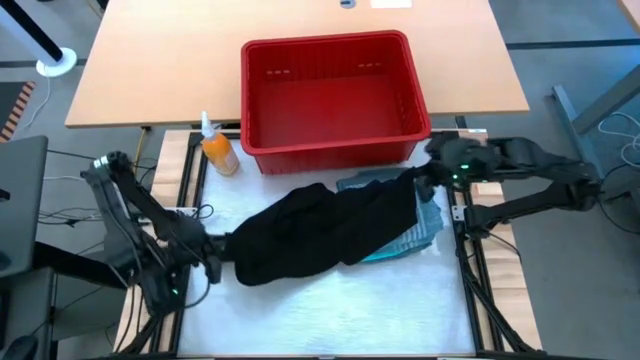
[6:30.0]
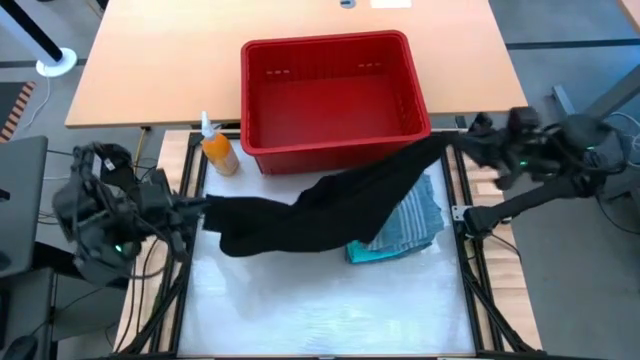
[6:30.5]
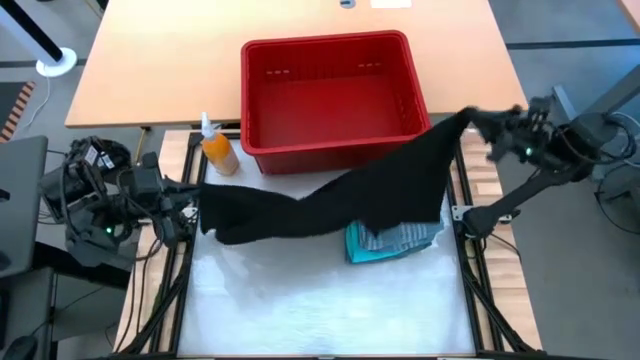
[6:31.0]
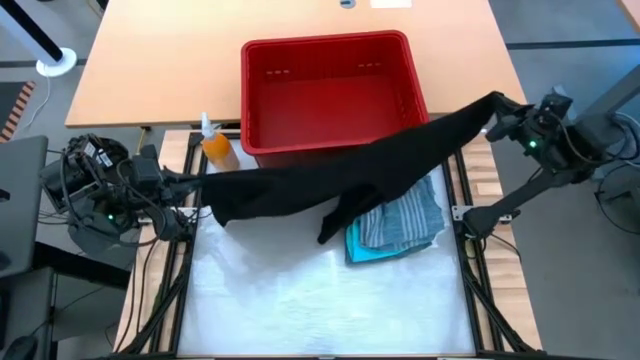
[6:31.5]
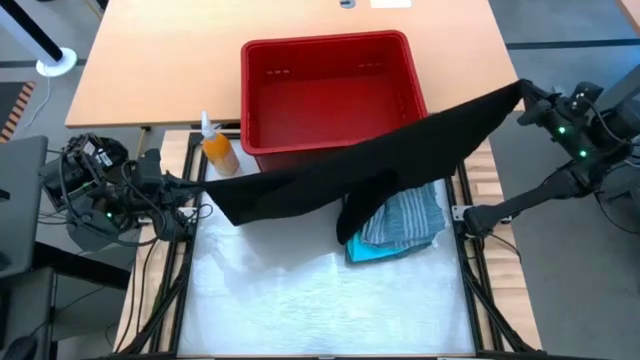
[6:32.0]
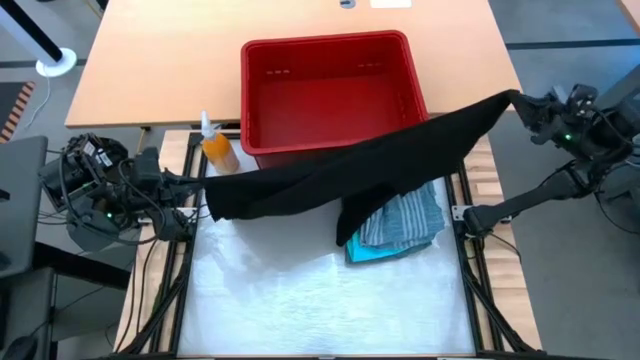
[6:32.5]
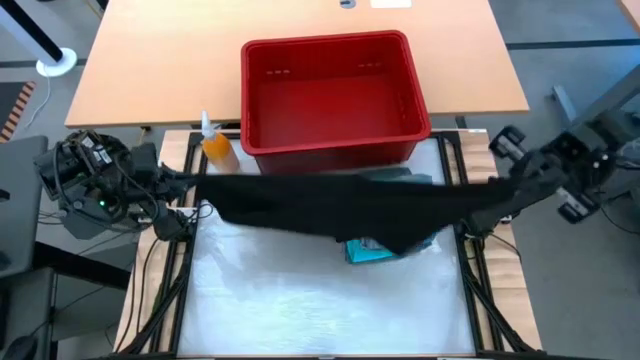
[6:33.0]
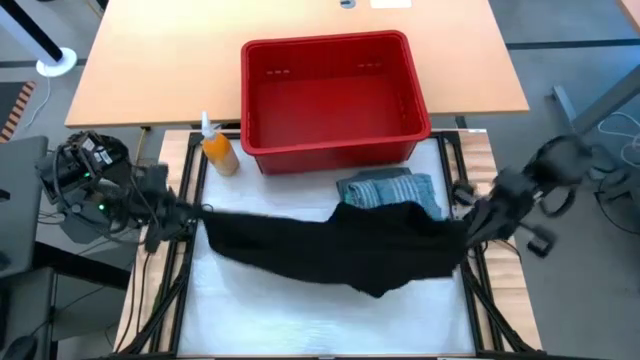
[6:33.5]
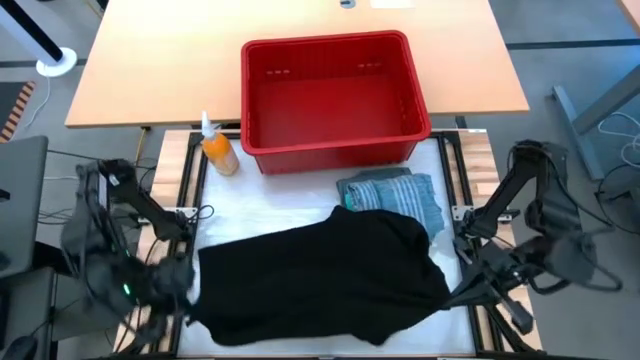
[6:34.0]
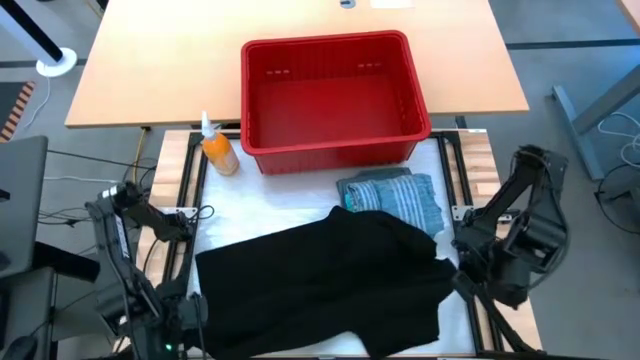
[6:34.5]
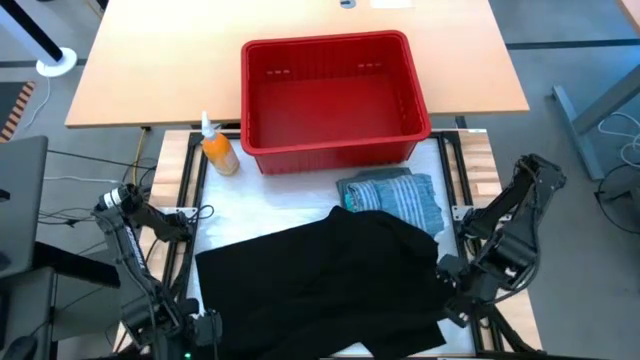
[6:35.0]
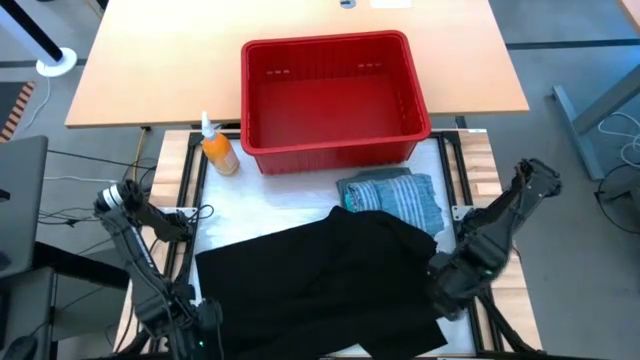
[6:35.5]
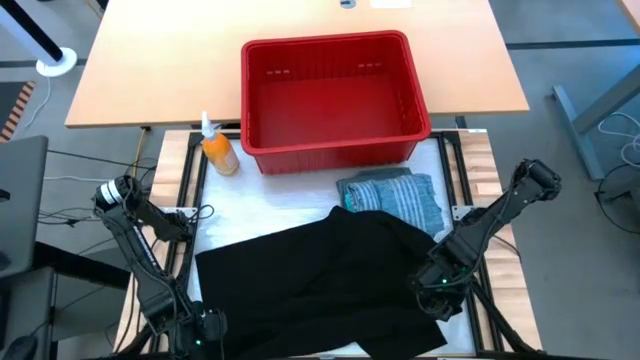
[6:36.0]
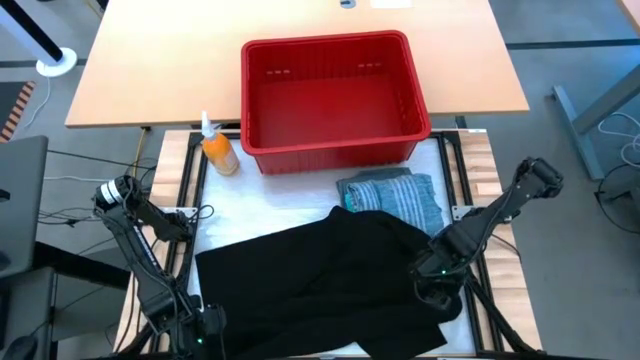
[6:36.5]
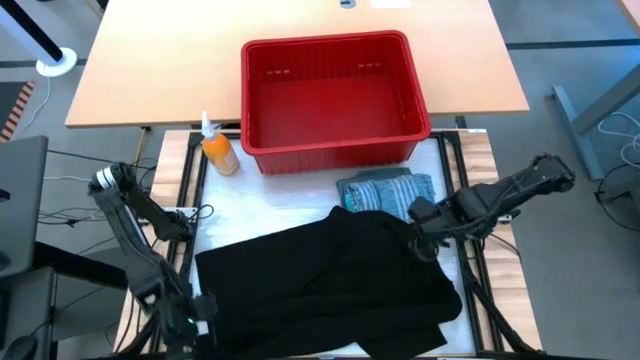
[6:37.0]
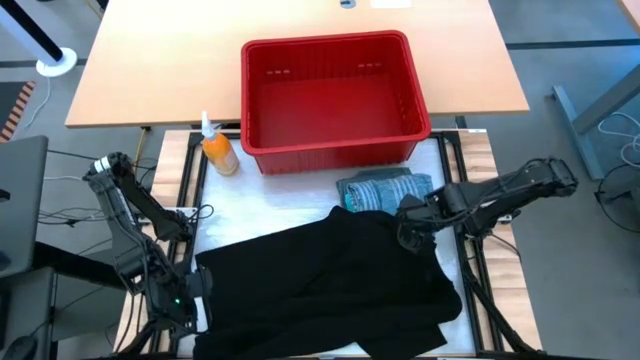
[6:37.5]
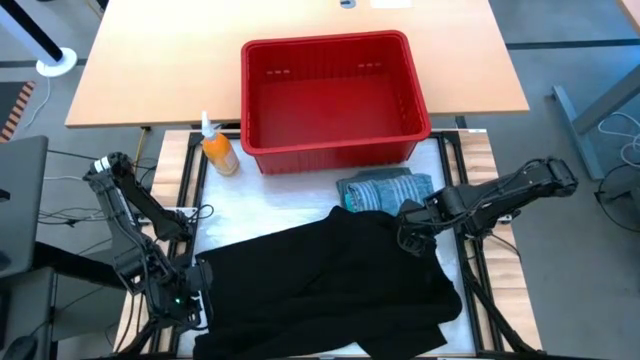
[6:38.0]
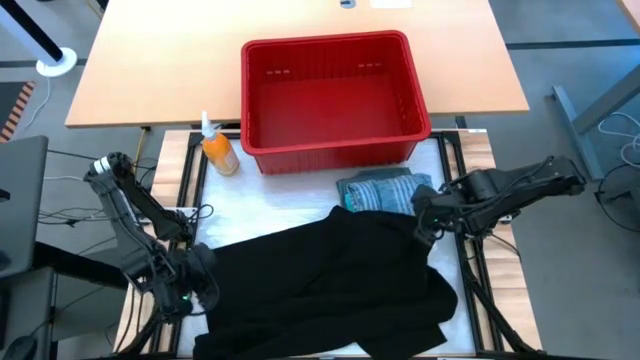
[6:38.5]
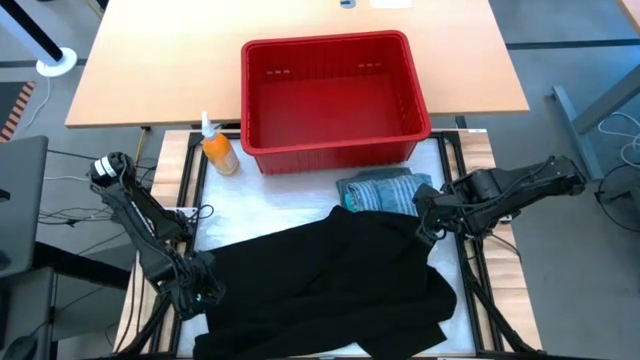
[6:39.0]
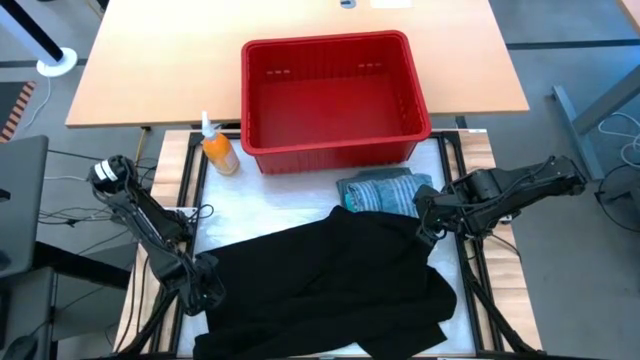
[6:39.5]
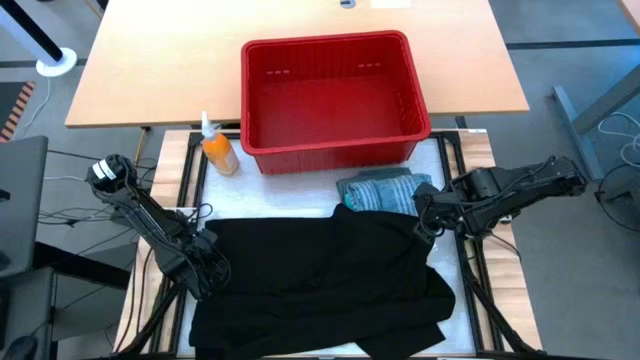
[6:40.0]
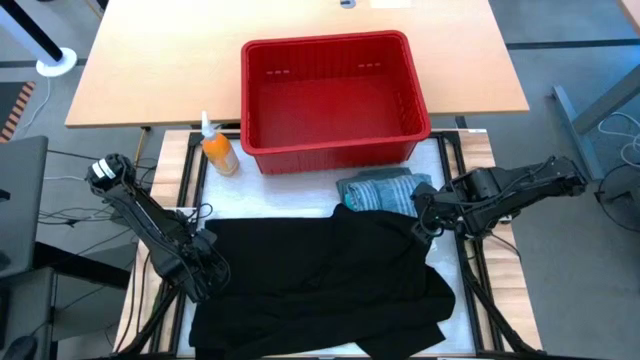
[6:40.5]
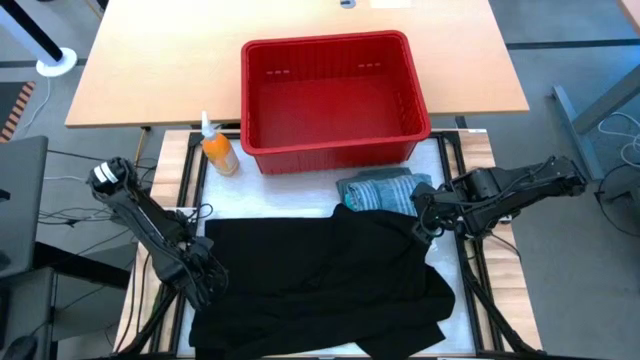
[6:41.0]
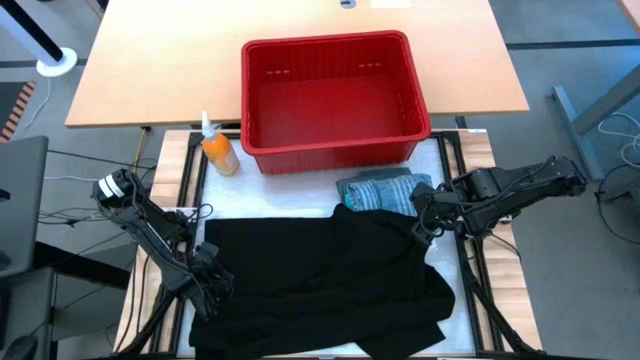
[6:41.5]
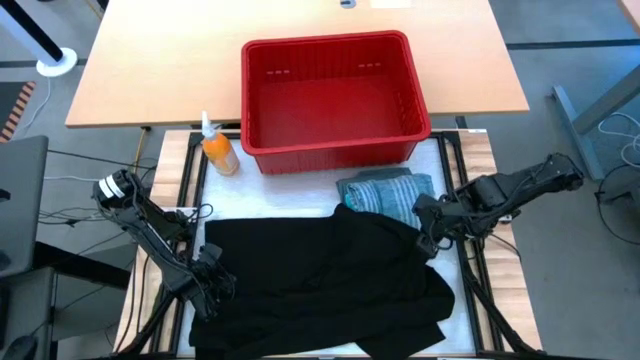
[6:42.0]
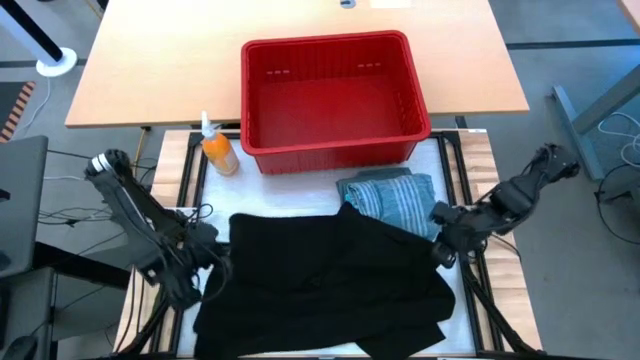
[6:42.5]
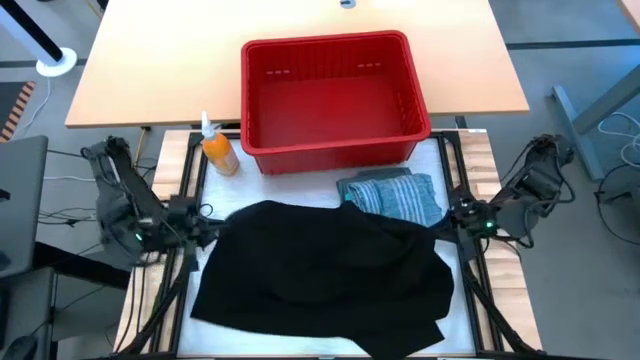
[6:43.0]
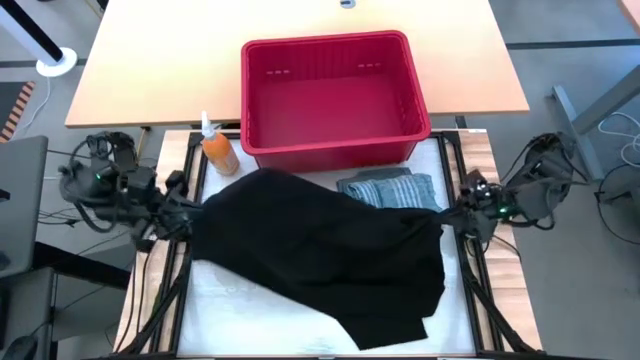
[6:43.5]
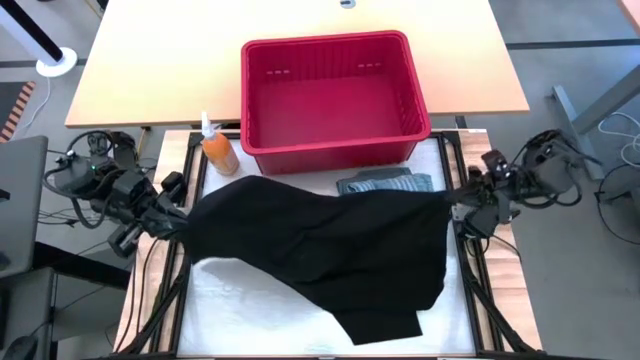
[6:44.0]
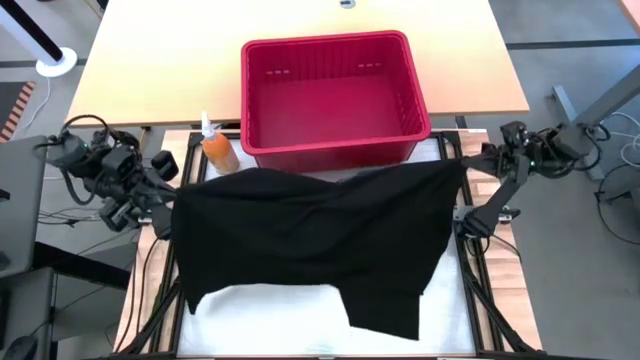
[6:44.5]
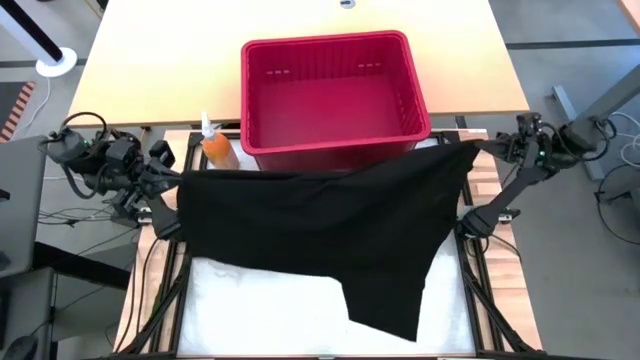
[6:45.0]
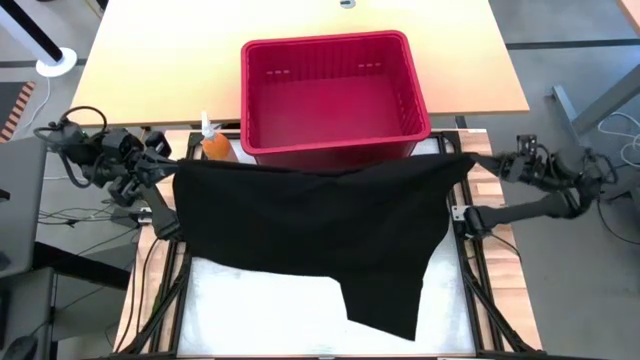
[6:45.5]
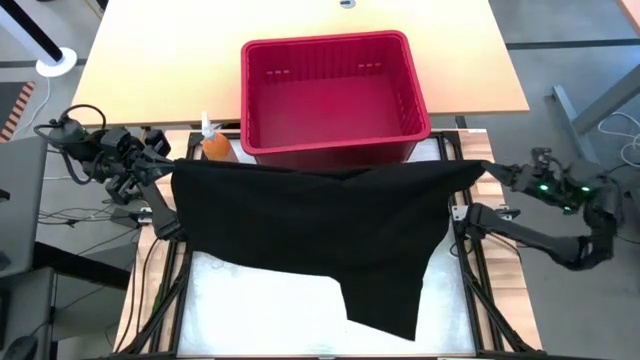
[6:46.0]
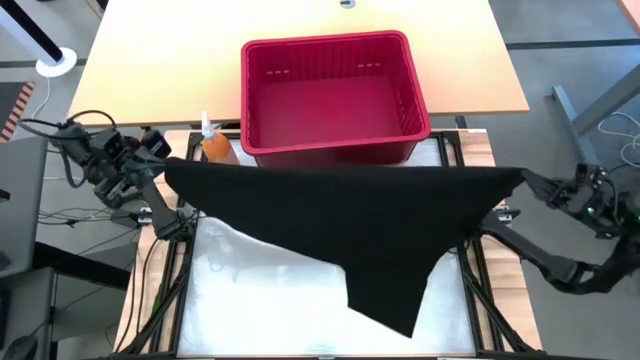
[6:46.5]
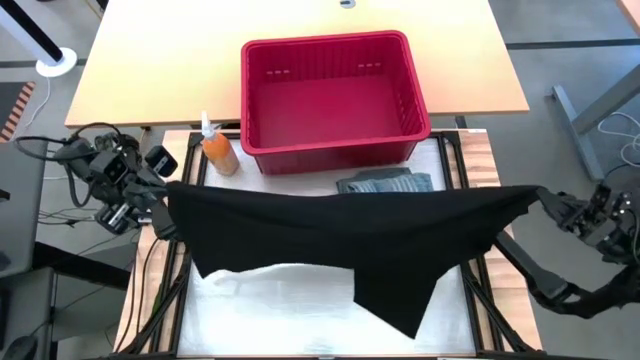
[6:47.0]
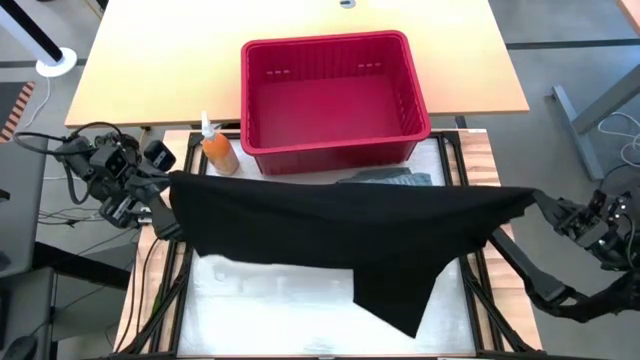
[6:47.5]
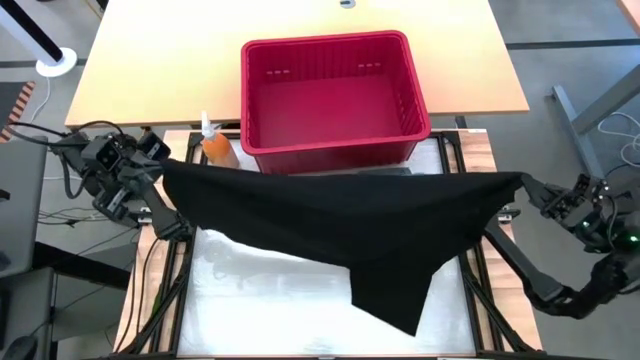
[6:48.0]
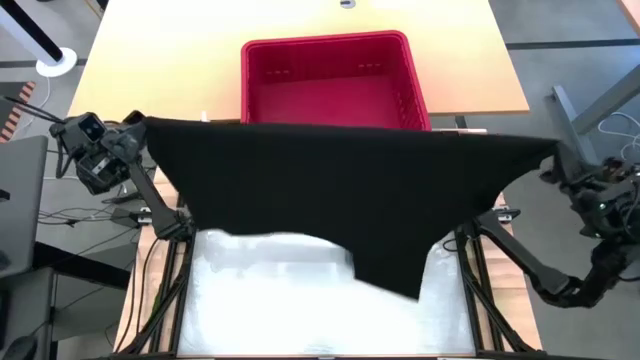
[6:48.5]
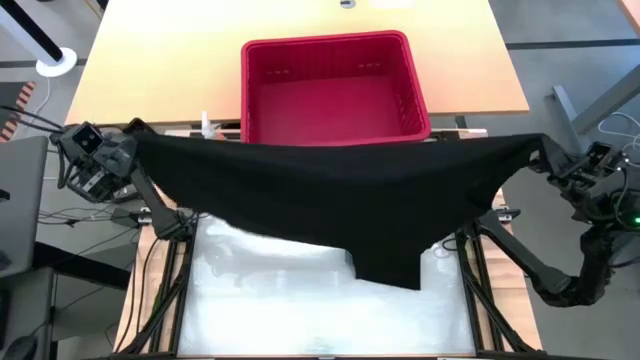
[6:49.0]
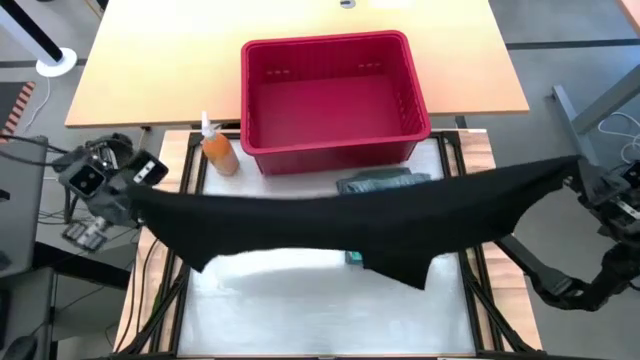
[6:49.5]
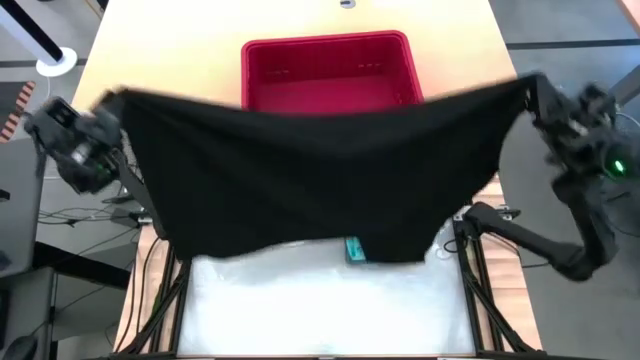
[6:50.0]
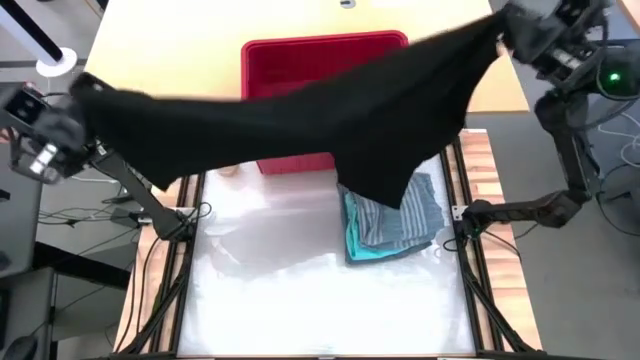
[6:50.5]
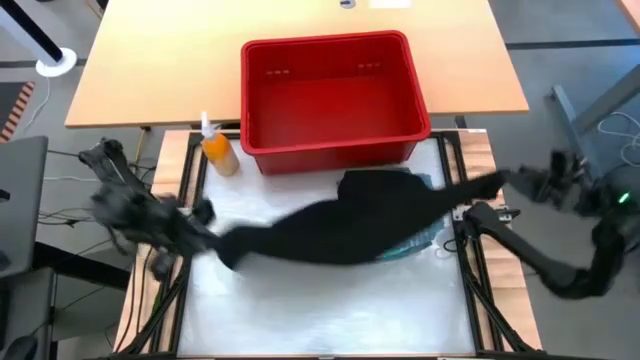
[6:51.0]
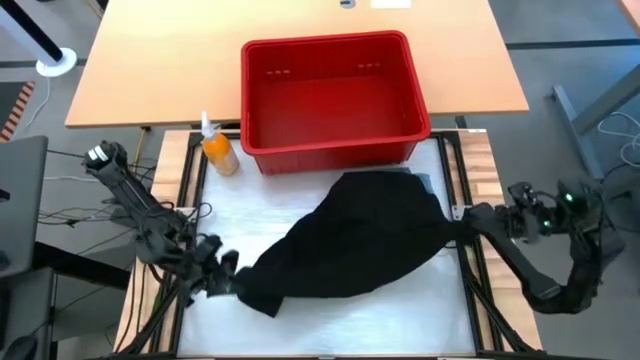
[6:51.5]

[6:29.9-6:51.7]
Task: Fold Laundry from Bin
Fold the black shirt
